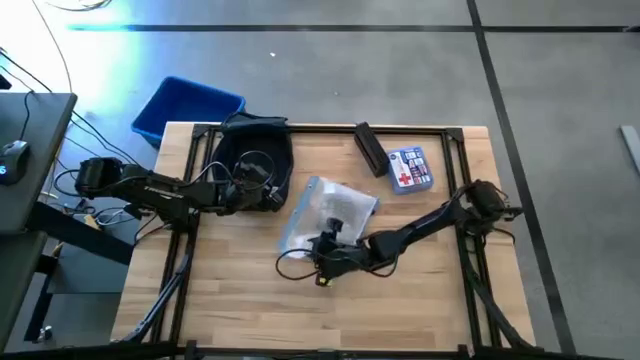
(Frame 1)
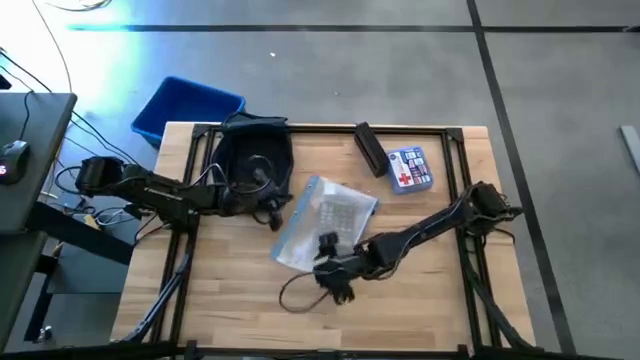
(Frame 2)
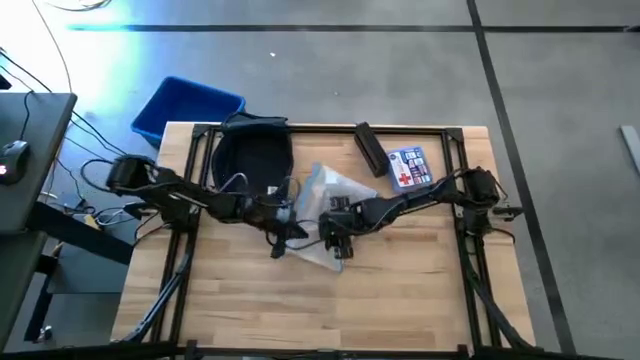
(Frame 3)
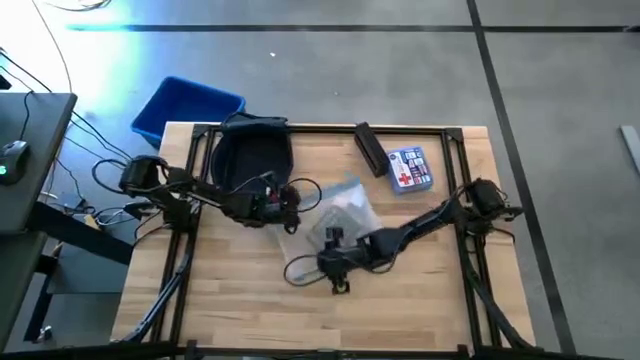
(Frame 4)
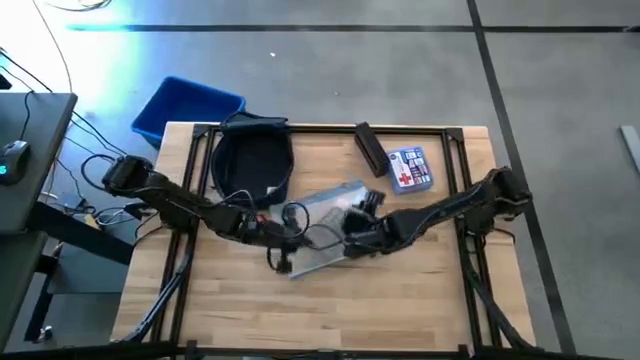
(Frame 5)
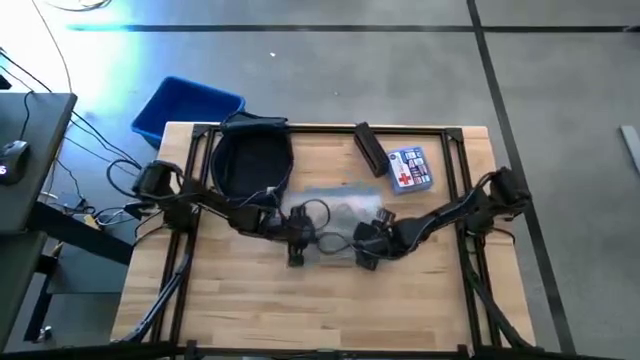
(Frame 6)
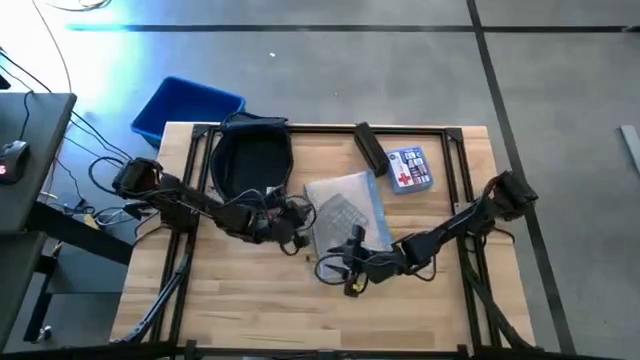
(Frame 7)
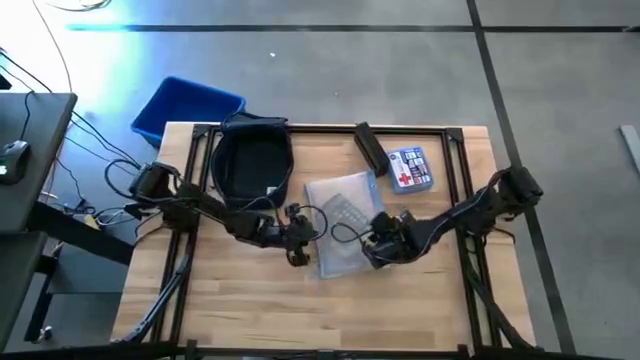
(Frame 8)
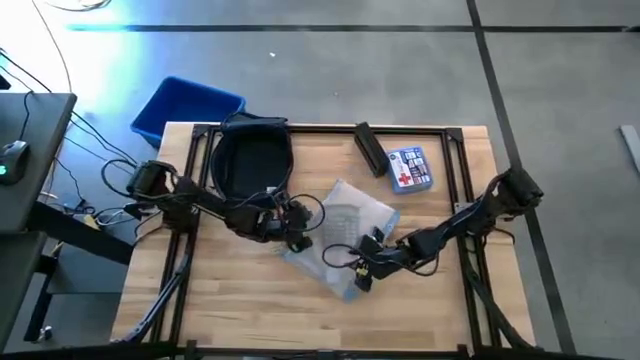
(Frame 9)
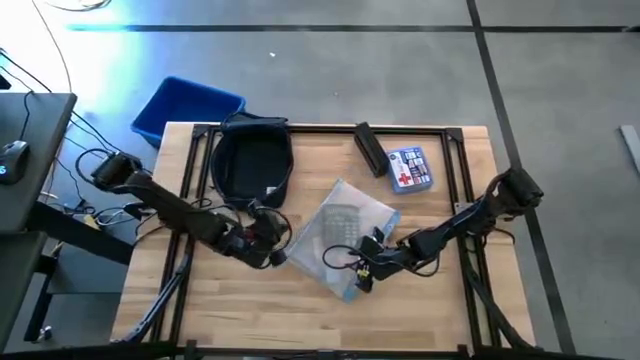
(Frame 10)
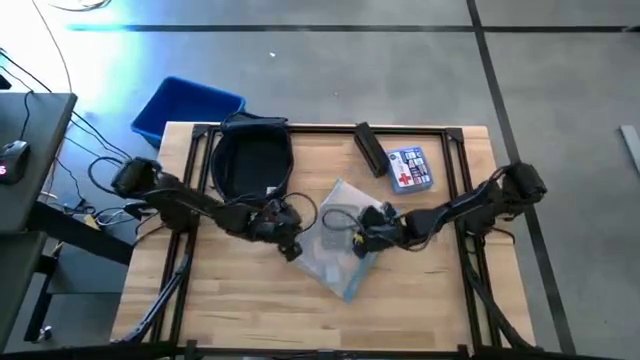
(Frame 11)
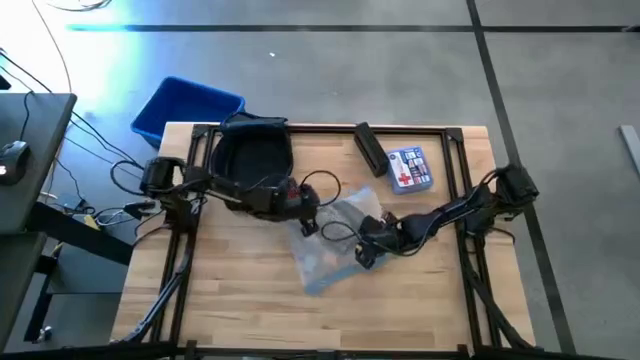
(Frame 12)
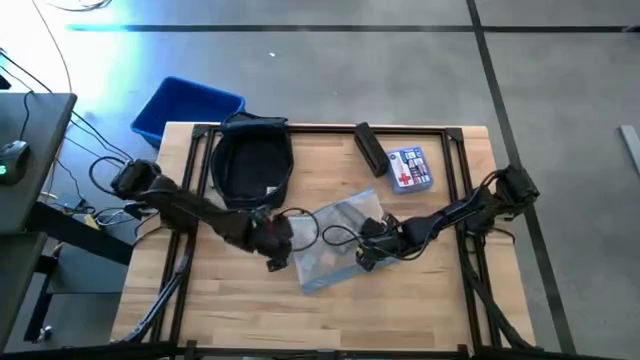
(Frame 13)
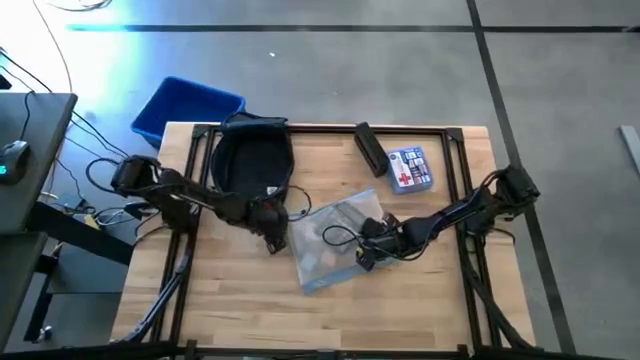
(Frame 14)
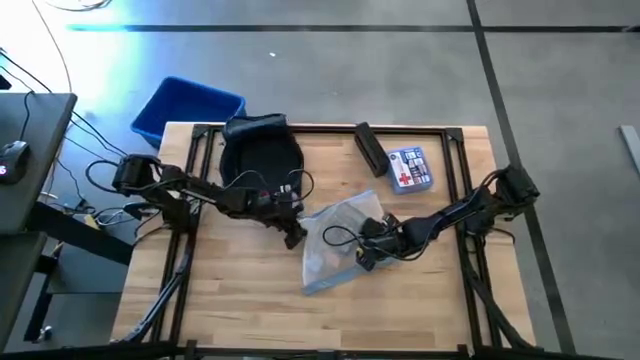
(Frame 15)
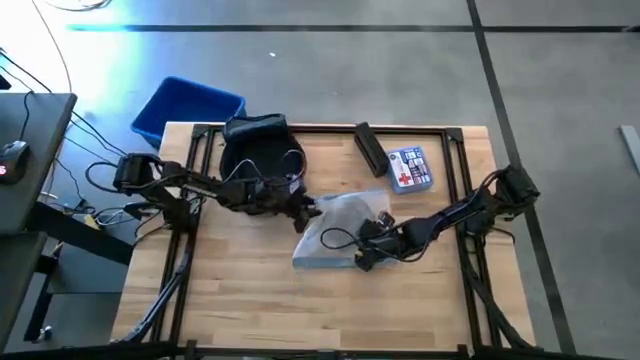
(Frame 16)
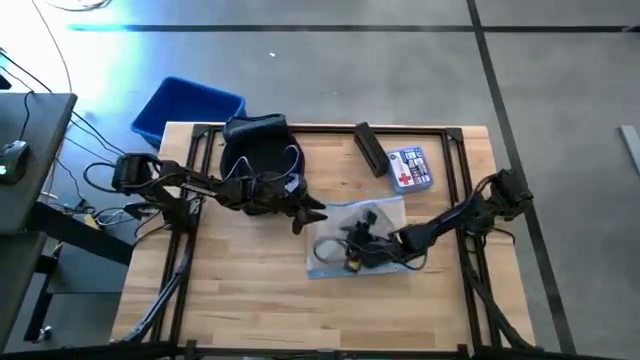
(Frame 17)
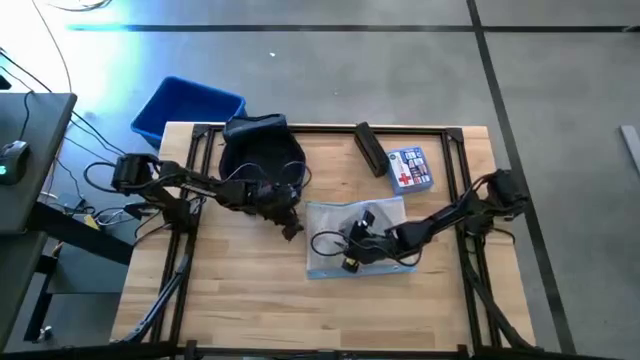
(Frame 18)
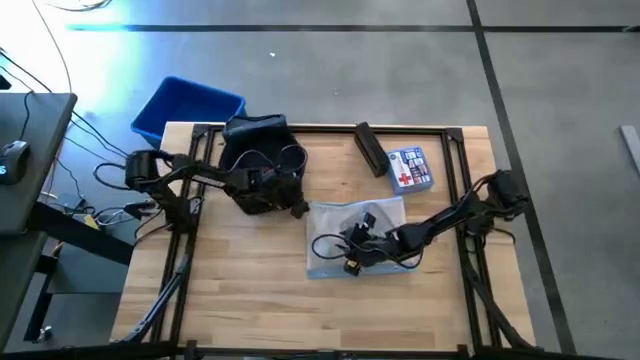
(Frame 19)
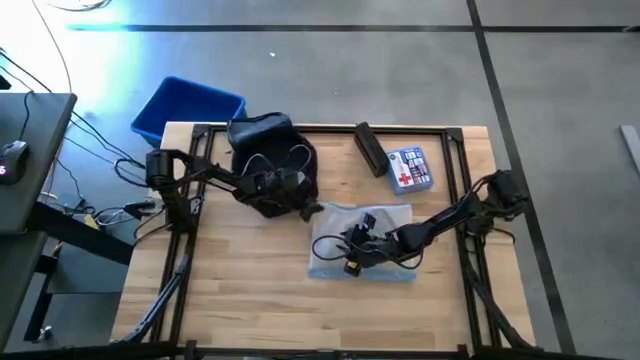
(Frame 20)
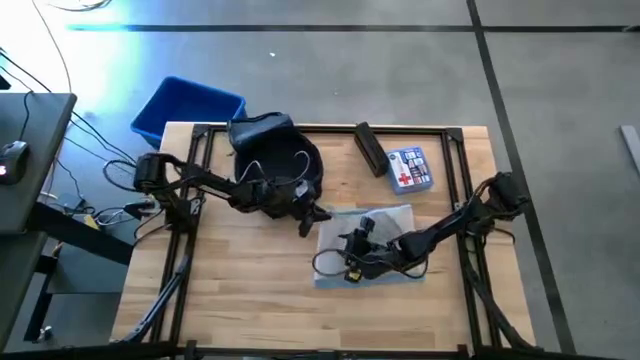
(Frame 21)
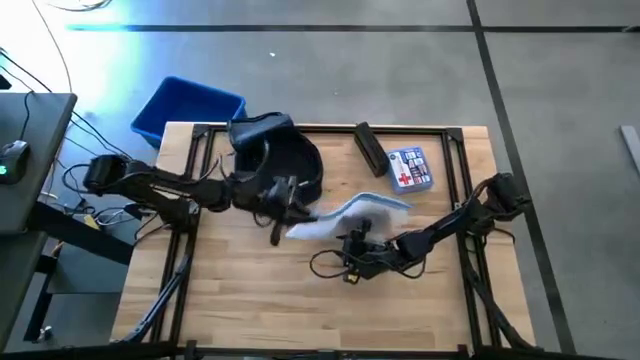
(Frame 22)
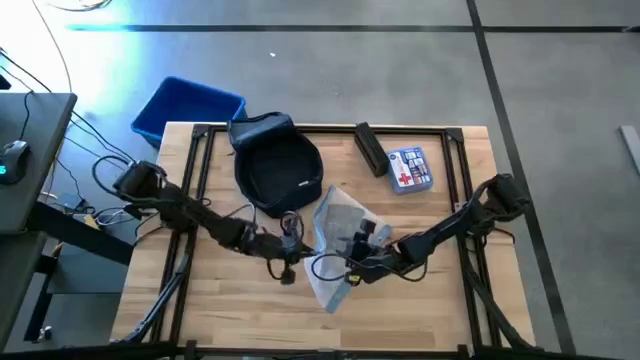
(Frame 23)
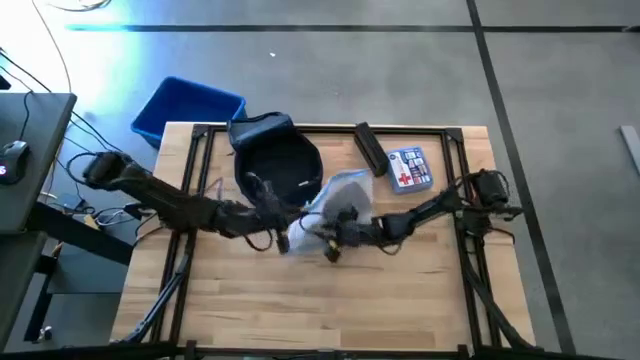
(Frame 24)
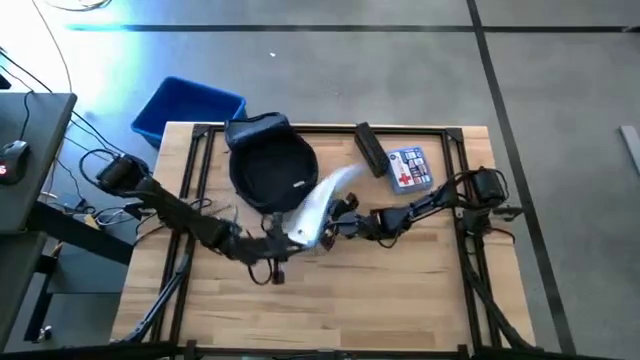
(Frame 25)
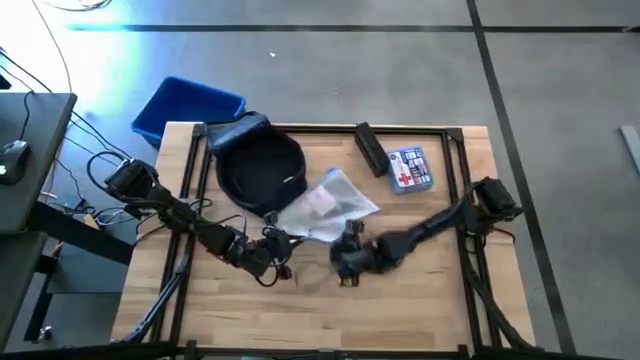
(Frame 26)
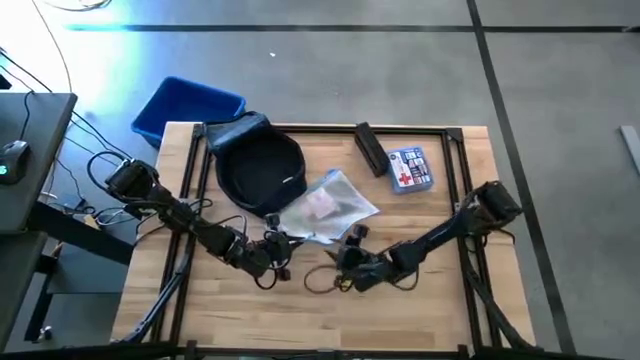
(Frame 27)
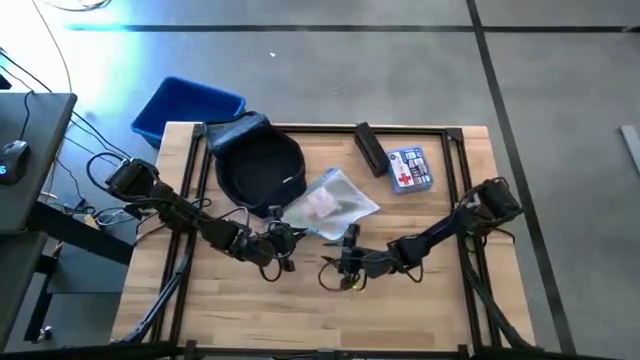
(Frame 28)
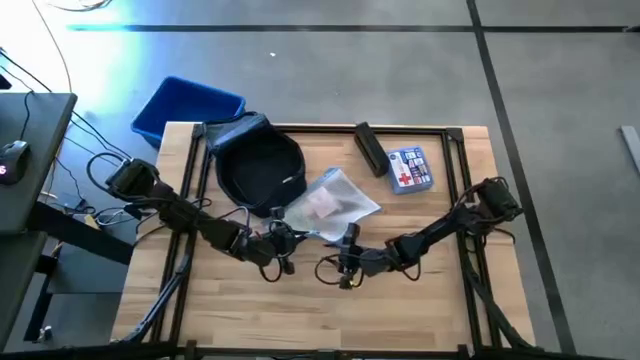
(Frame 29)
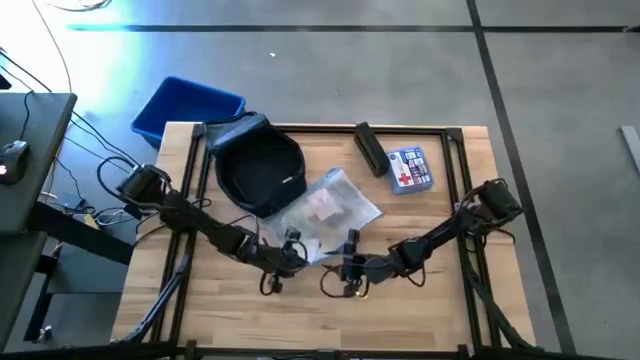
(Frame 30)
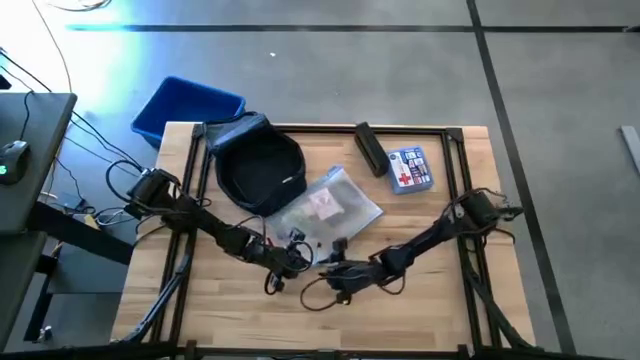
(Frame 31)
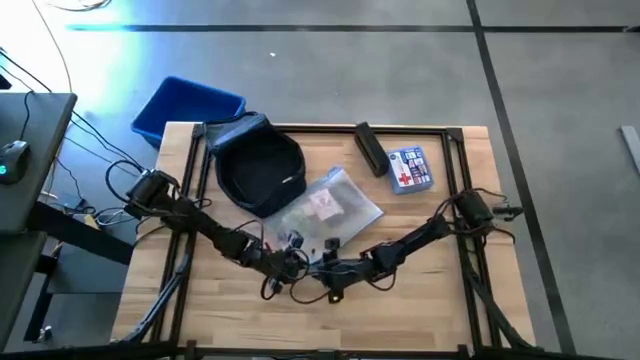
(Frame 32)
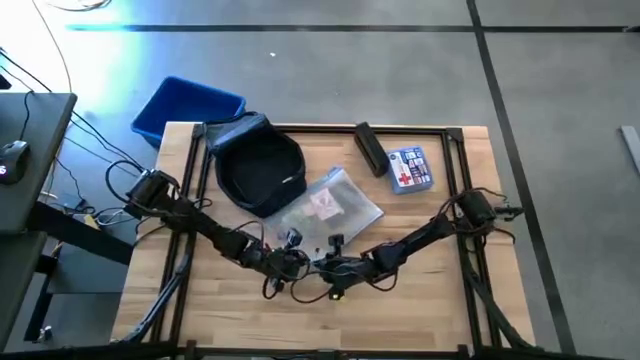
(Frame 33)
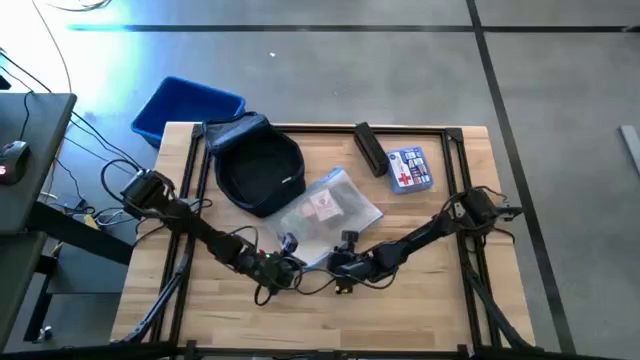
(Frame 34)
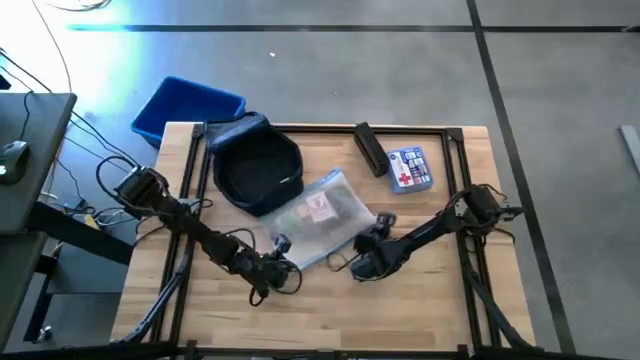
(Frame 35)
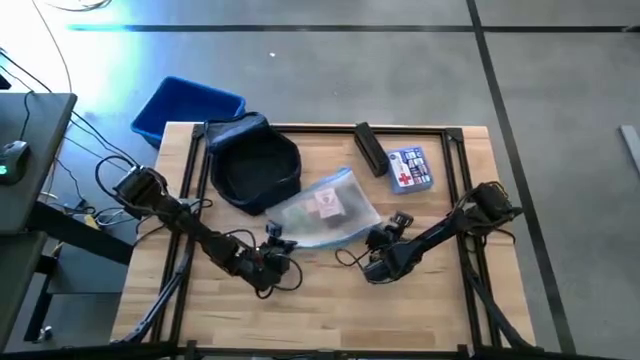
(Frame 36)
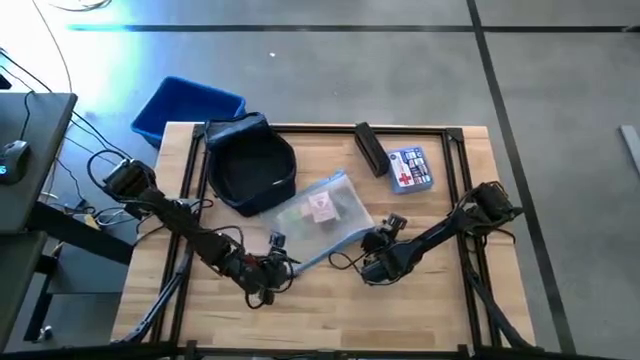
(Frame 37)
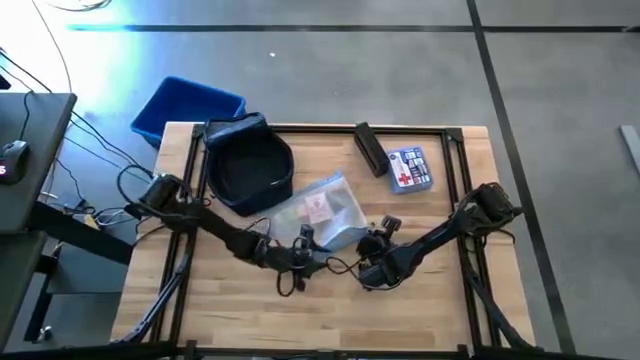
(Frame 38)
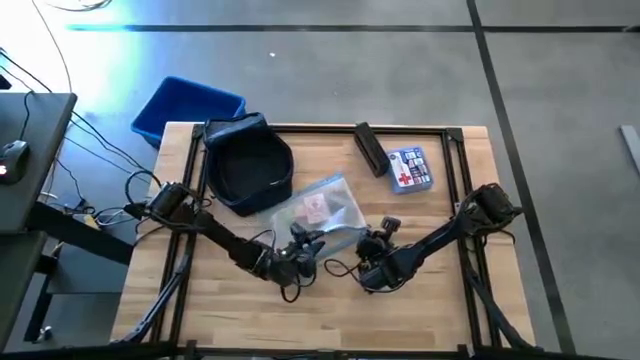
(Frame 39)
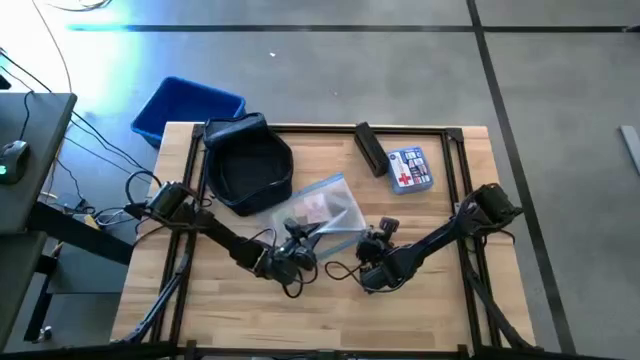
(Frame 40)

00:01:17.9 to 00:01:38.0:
Task: Unpack backpack
Open the white zip bag

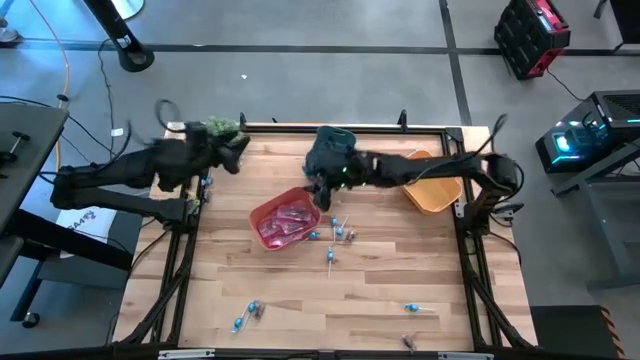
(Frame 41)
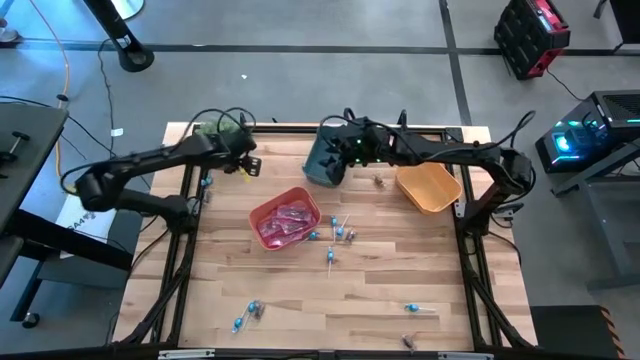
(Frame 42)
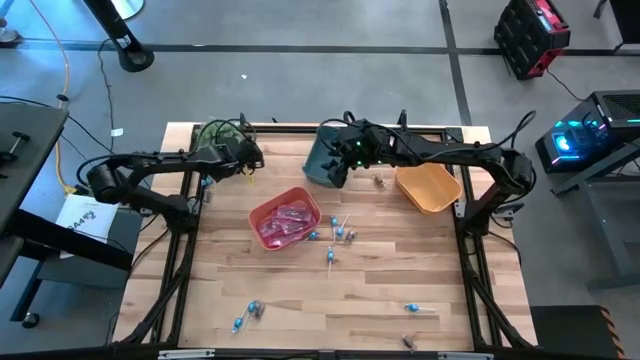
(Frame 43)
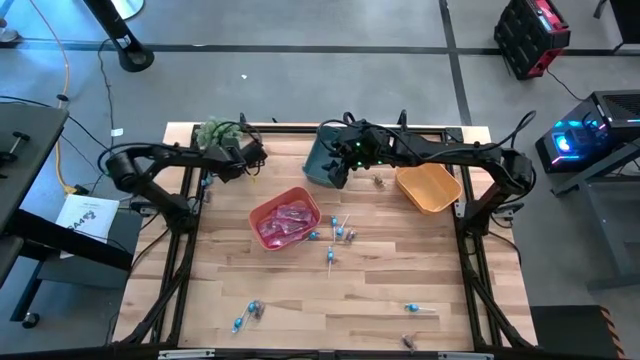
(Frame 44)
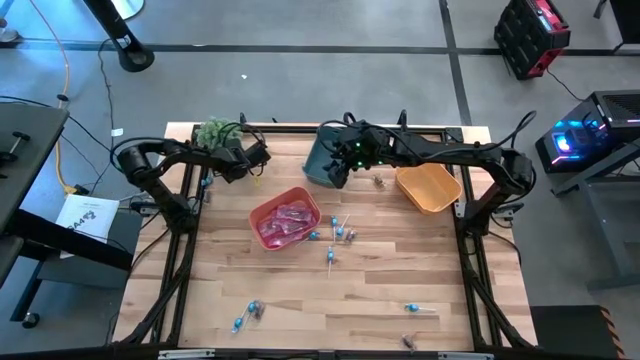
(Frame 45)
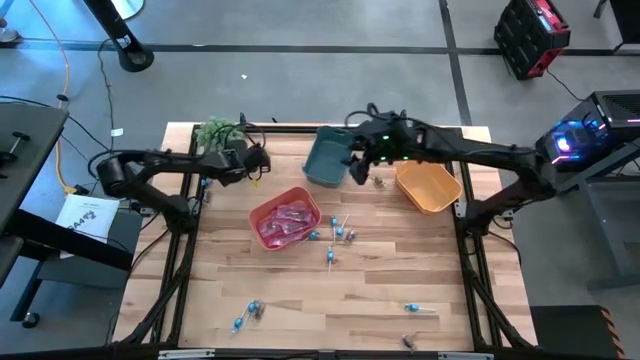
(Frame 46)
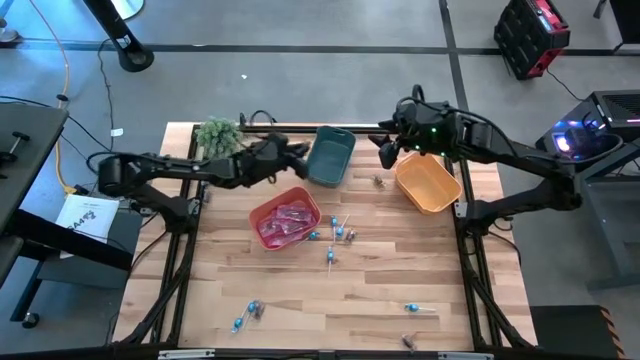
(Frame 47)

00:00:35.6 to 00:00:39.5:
Task: Sort candy
Put the black candy into the blue bin
